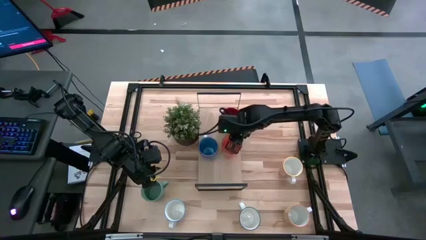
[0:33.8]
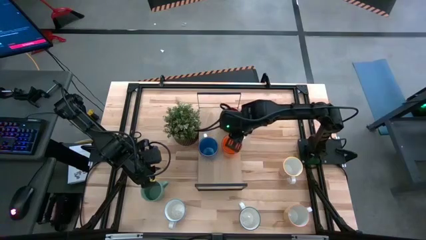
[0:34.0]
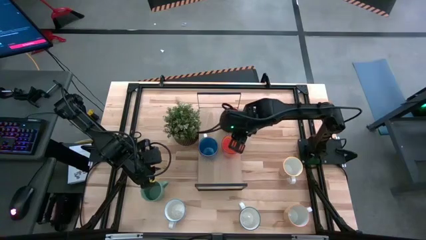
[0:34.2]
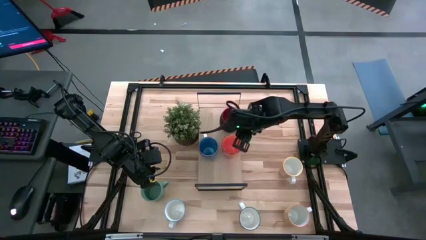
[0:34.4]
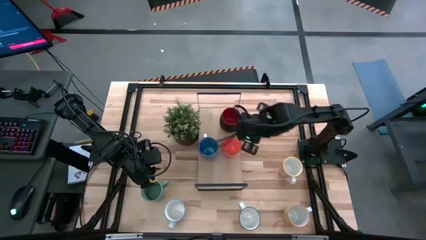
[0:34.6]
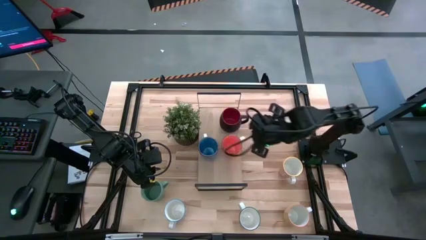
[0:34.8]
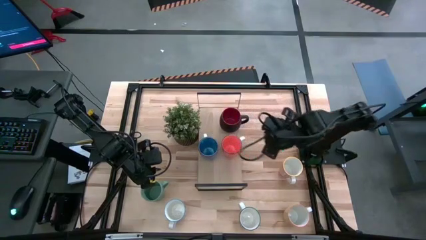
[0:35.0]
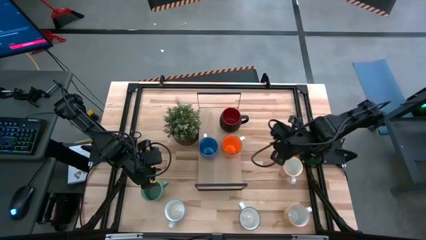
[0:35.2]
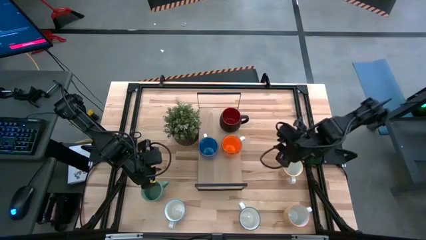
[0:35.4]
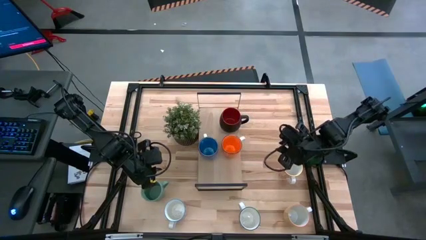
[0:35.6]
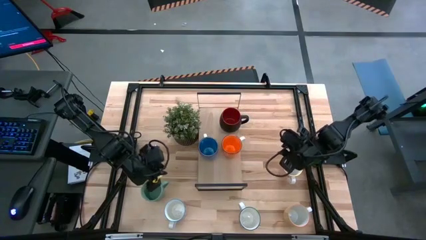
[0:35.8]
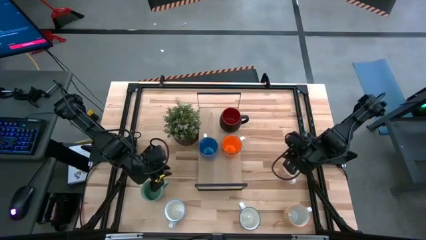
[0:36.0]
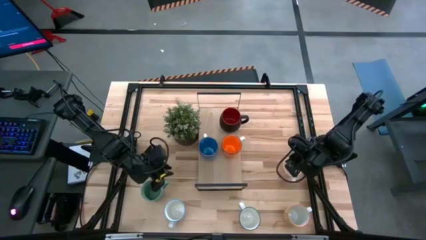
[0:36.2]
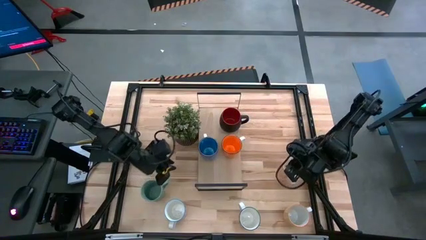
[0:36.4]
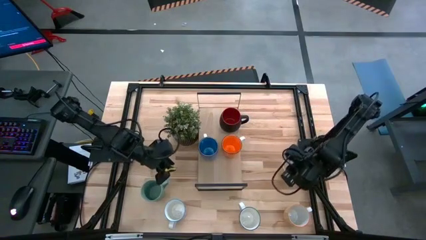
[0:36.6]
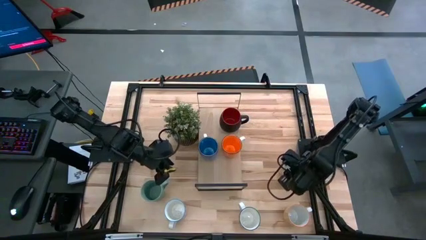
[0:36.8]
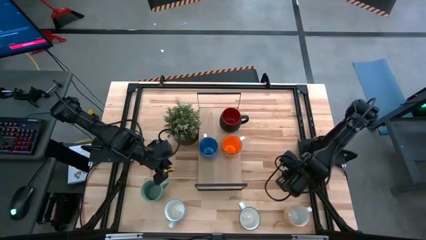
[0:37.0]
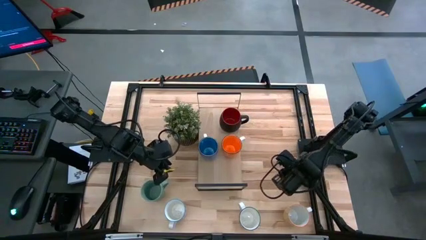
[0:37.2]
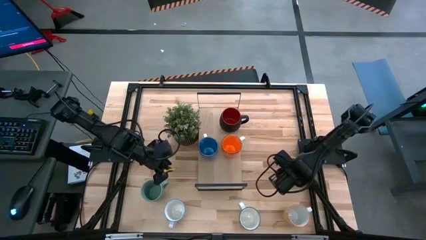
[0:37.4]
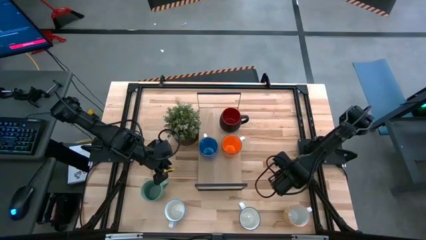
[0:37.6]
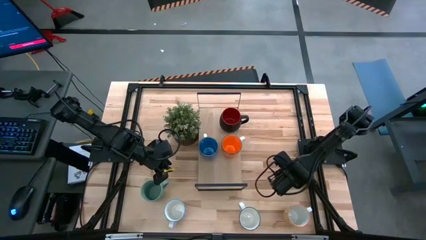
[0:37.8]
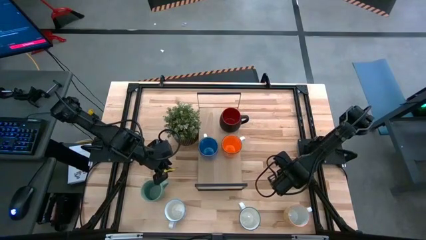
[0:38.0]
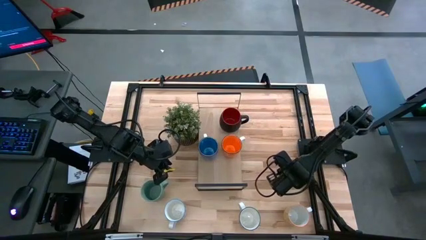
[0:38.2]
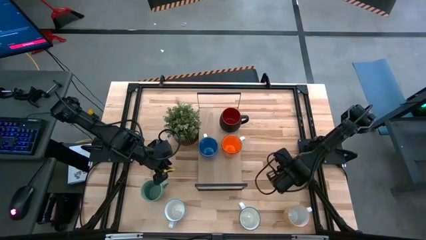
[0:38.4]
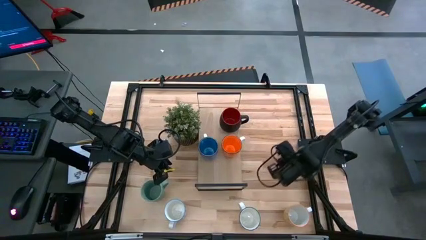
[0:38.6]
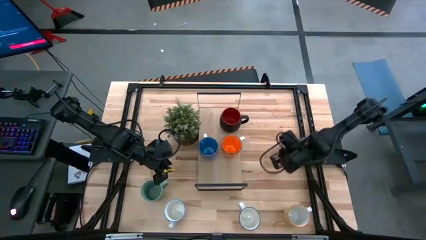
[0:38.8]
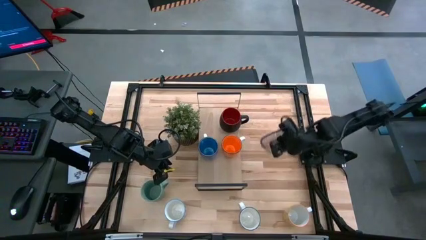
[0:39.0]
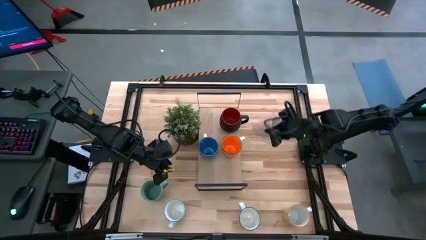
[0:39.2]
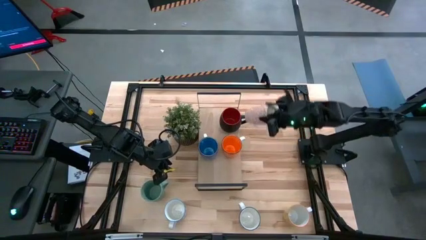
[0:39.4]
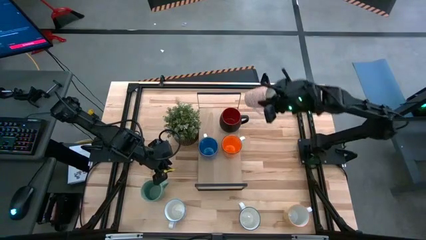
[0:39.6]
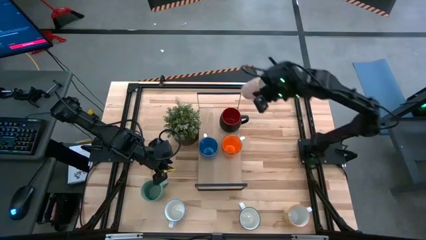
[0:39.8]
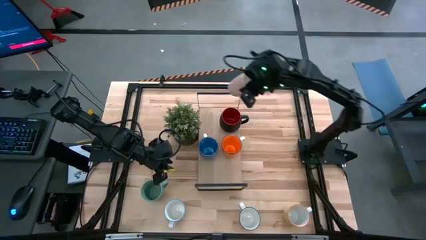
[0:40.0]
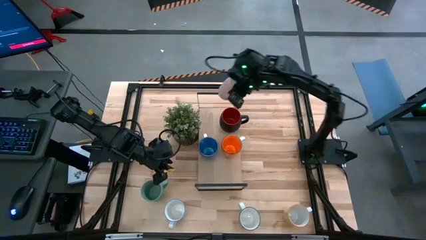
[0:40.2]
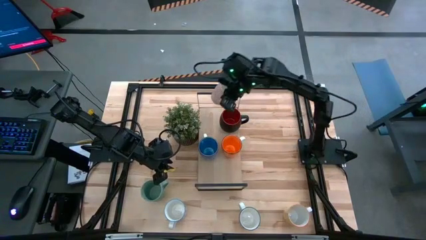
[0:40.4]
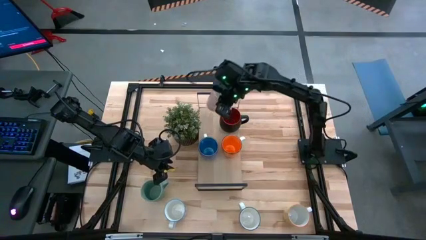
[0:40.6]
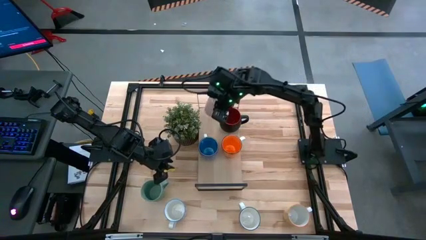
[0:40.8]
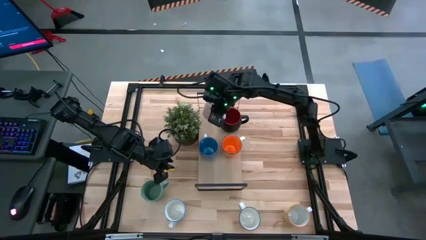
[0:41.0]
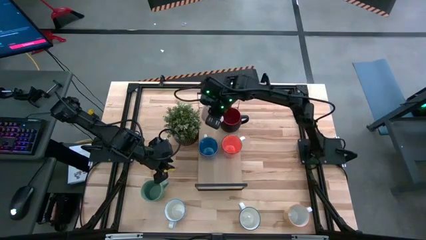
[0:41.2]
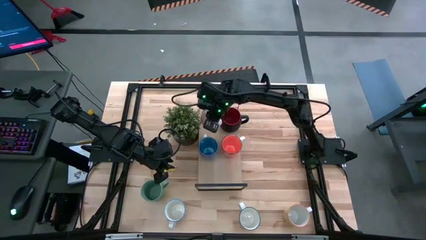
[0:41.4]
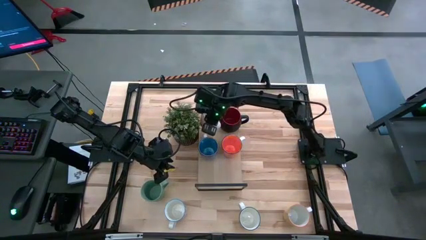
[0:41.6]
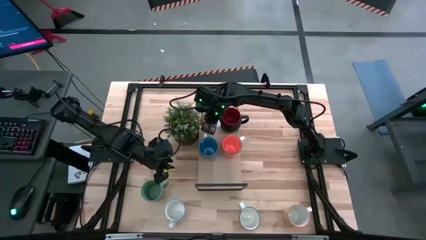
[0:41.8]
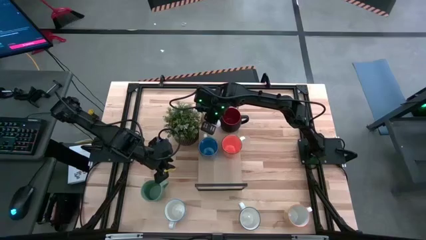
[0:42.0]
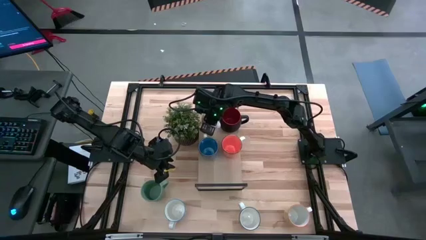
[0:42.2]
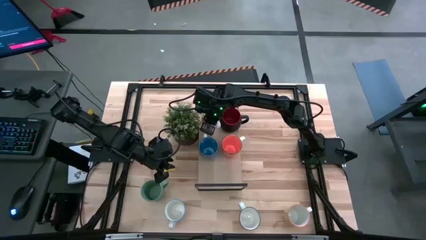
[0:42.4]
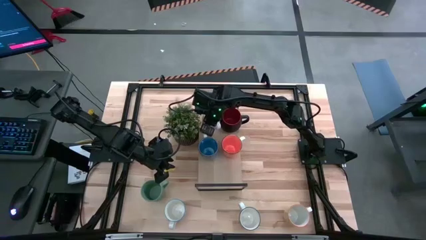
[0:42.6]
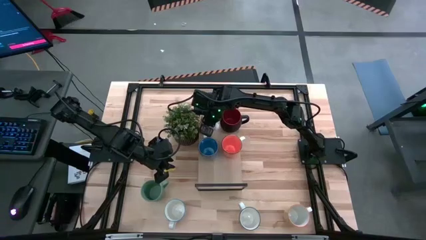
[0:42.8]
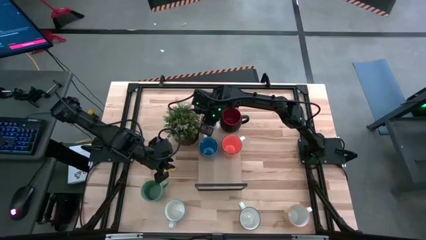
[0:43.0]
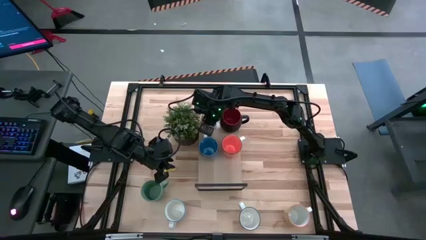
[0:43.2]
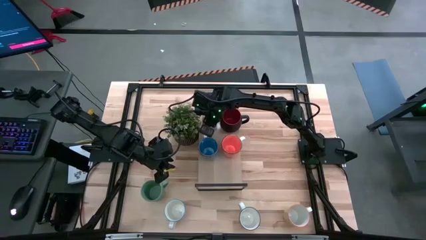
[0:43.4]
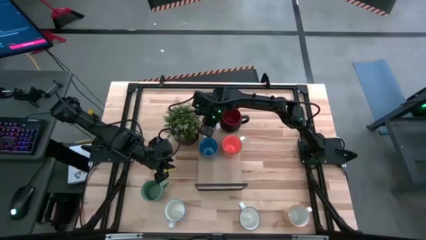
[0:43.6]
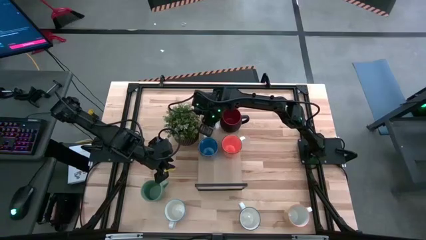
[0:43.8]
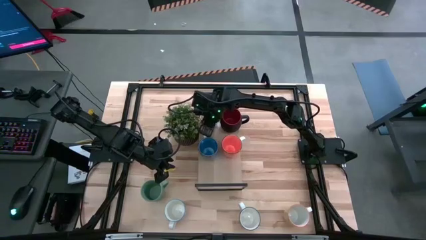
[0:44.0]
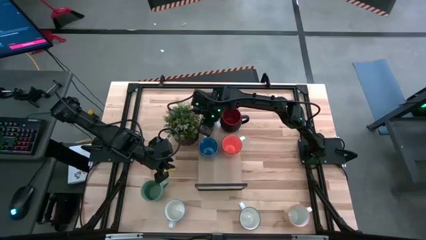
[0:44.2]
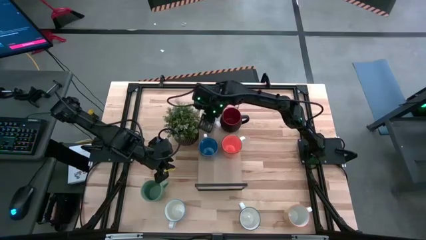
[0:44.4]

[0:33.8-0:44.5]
Task: Place coffee mugs
Put the patterned orange mug on the shelf

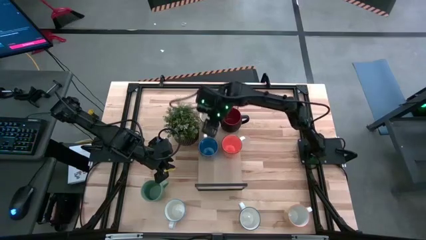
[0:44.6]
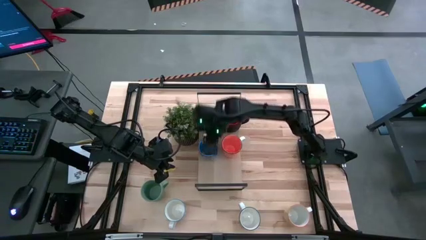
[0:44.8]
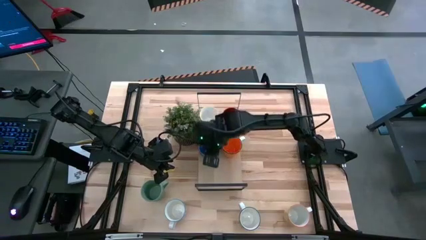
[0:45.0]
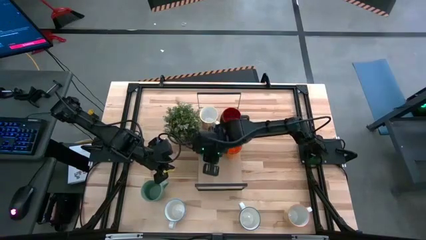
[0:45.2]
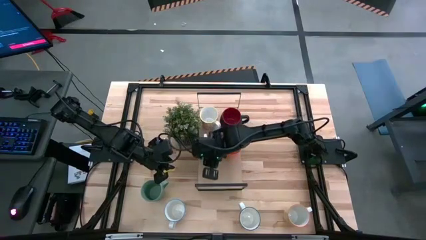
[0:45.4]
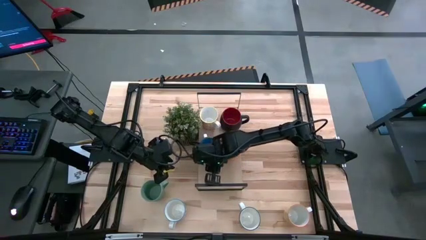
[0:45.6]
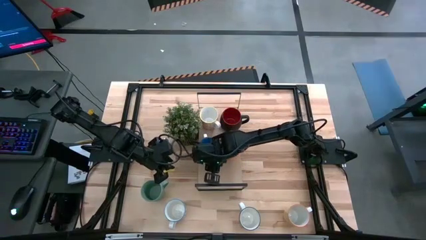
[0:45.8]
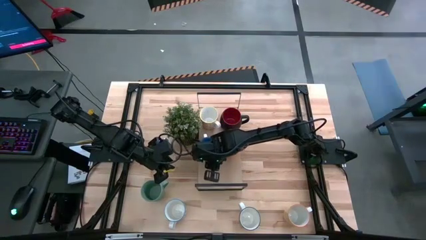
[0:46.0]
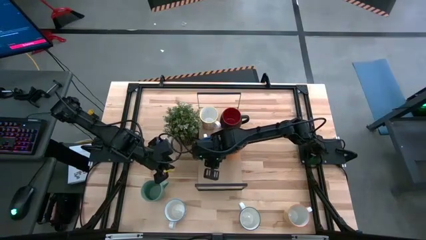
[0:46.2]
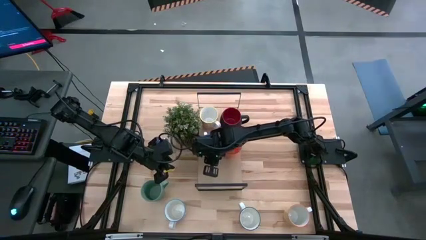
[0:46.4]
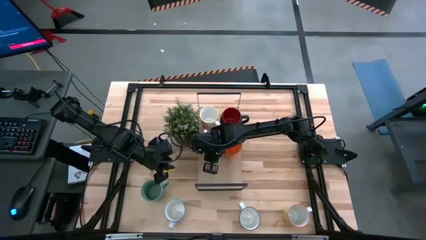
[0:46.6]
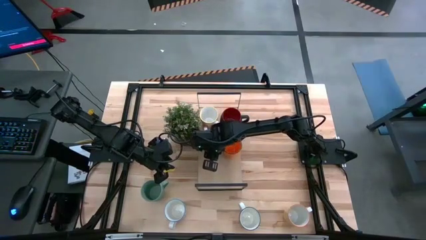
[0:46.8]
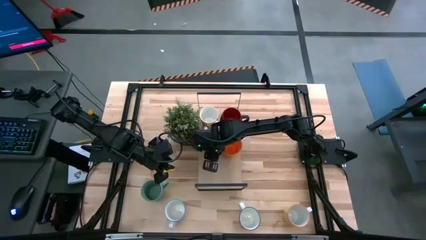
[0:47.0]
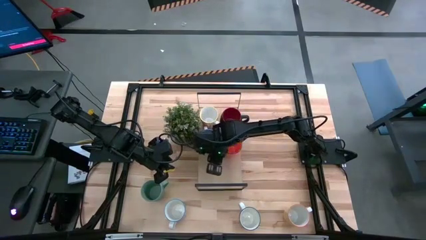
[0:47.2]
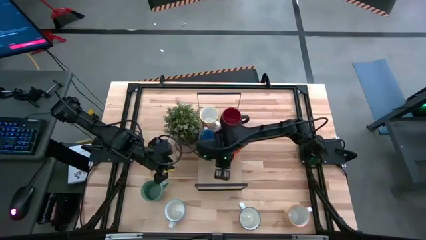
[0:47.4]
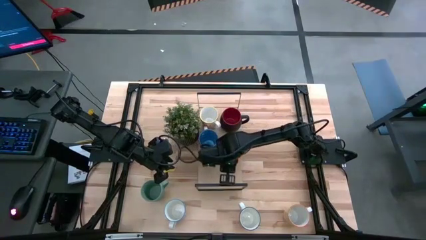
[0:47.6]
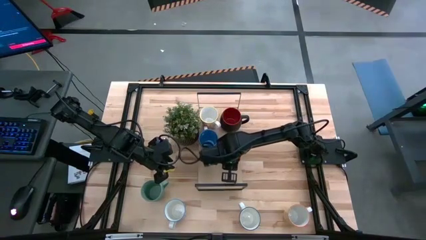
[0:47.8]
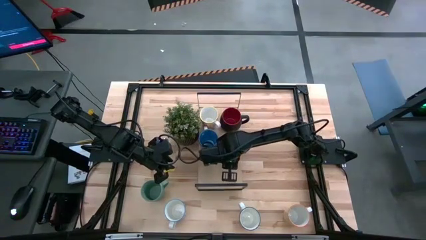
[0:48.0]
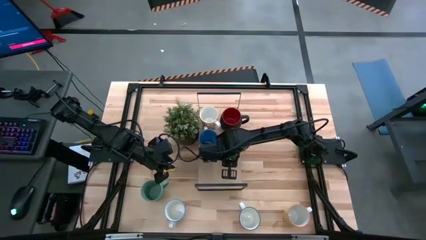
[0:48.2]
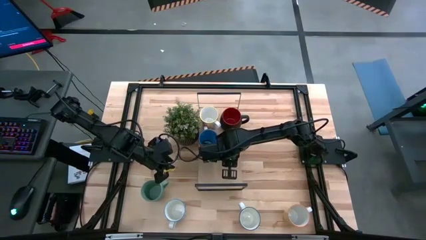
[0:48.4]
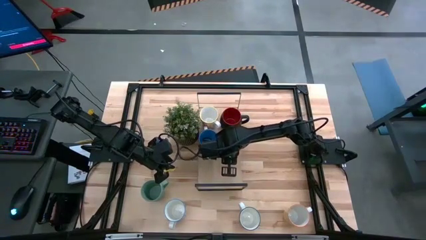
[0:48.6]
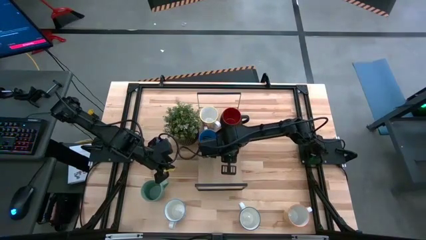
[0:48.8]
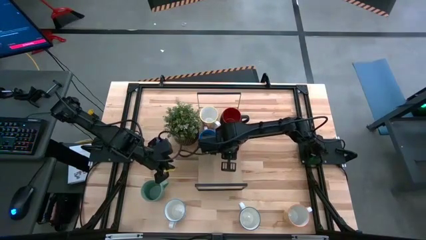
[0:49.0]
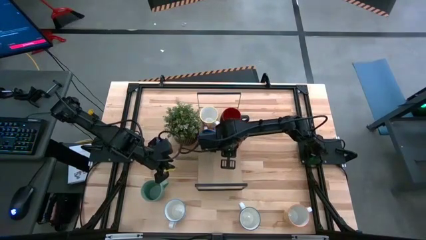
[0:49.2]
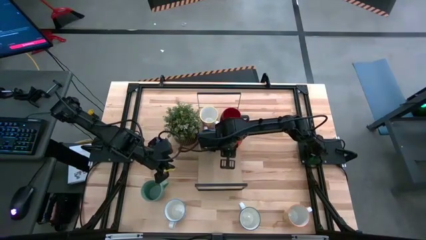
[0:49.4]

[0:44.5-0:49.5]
Adjust the mugs on the shelf

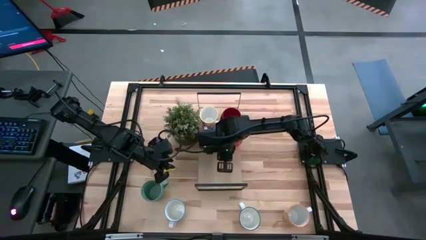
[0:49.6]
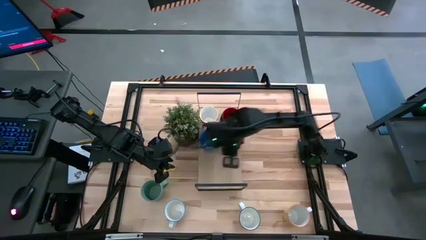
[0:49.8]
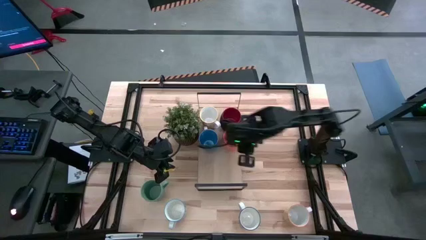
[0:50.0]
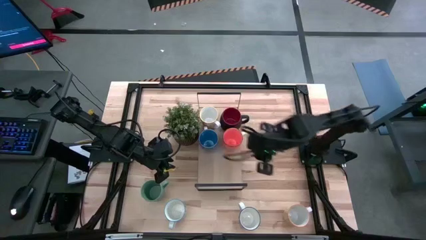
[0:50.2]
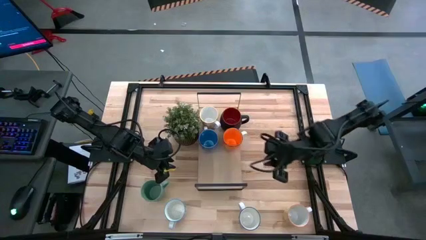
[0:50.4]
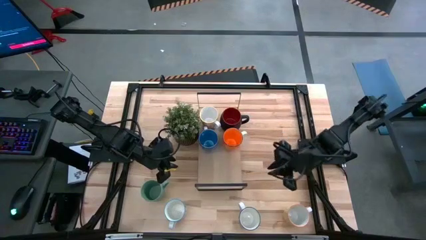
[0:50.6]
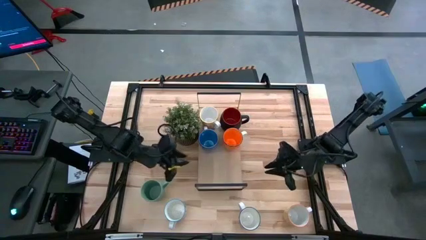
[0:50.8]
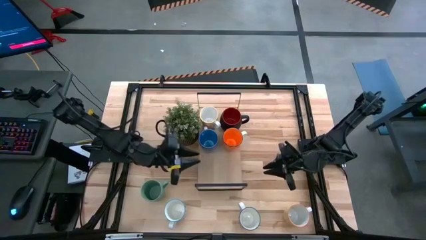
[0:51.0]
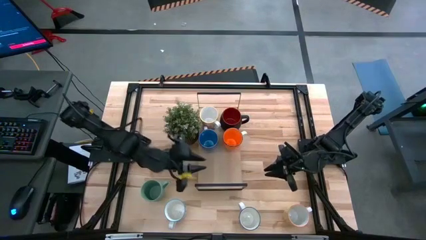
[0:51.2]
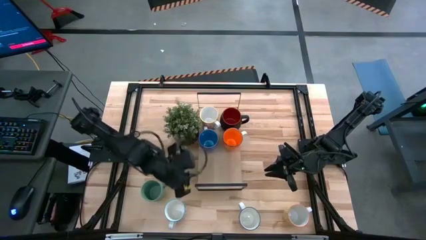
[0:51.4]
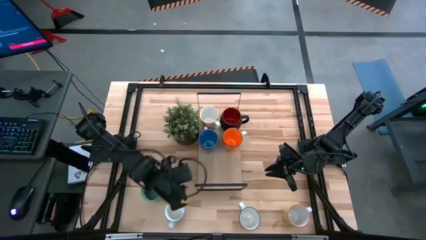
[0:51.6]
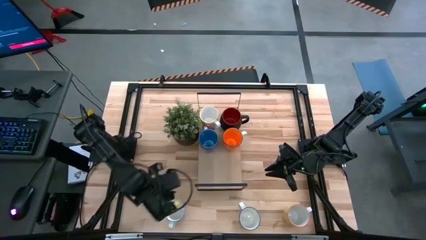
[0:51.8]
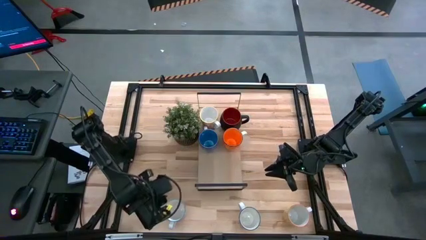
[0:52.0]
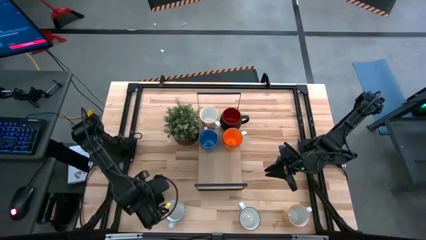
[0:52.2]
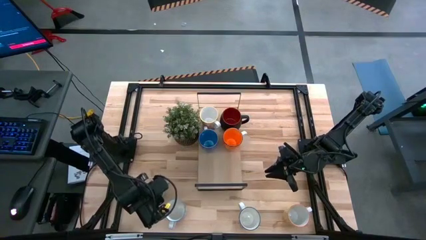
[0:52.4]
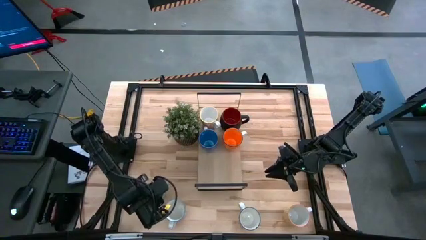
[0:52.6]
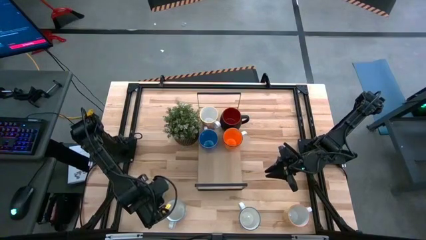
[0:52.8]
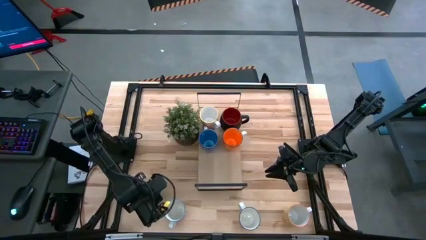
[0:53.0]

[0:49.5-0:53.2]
Put the light blue mug on the shelf
